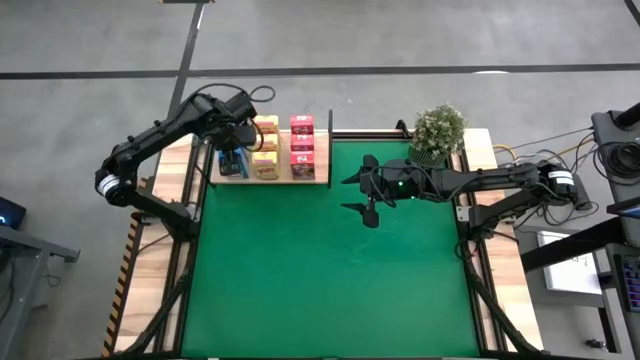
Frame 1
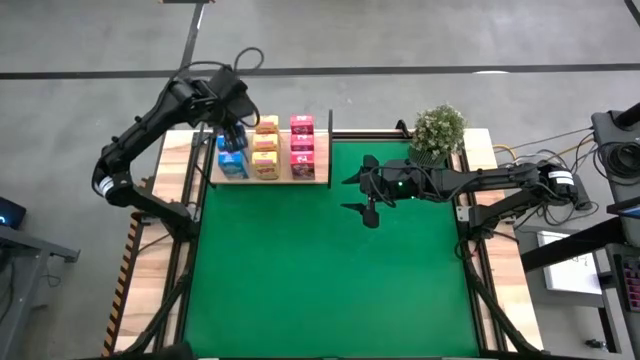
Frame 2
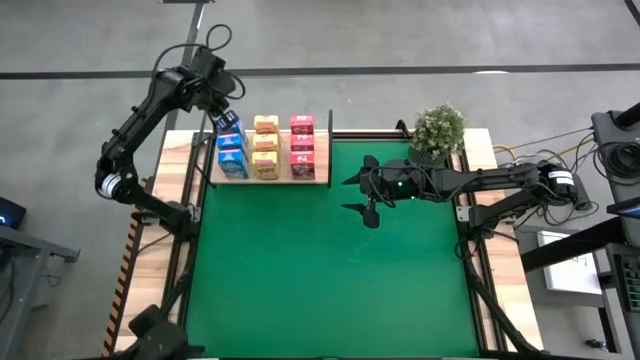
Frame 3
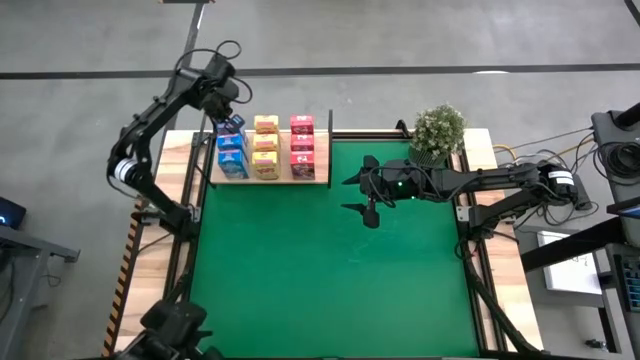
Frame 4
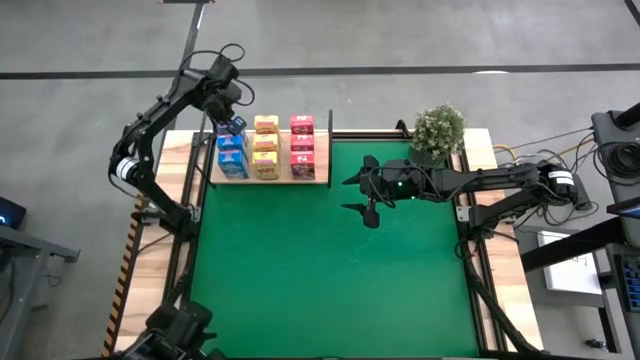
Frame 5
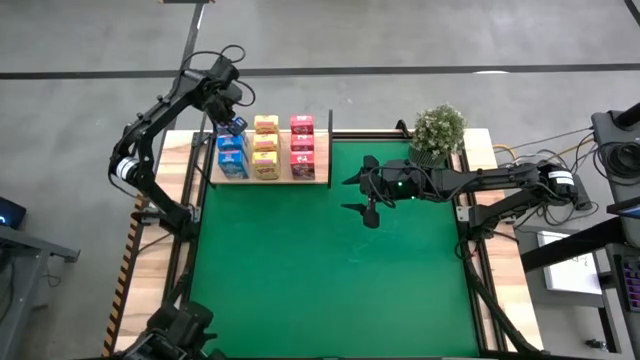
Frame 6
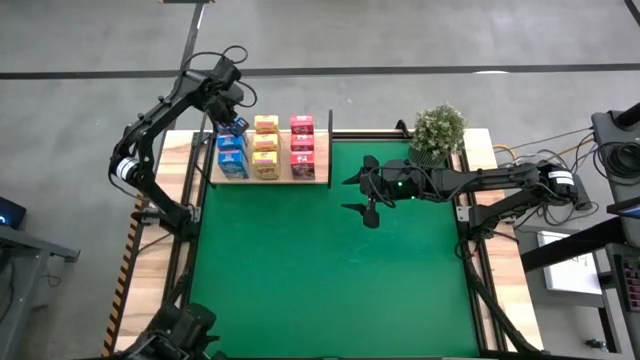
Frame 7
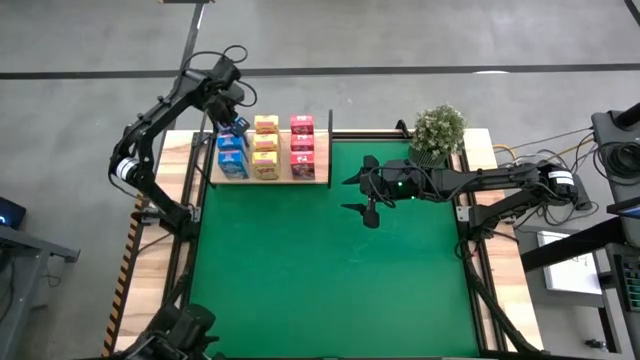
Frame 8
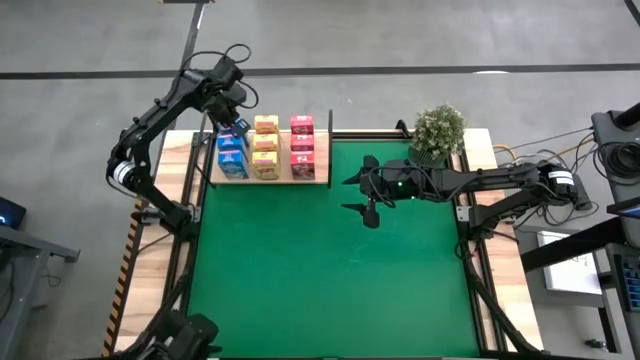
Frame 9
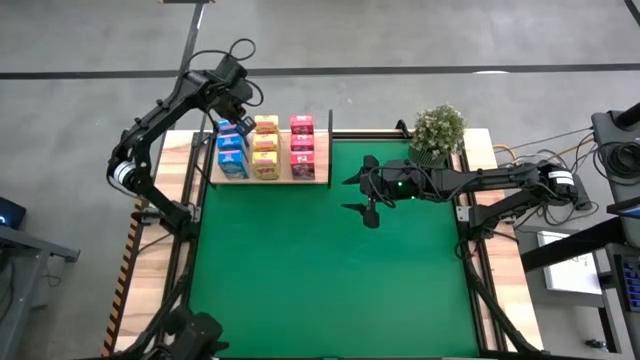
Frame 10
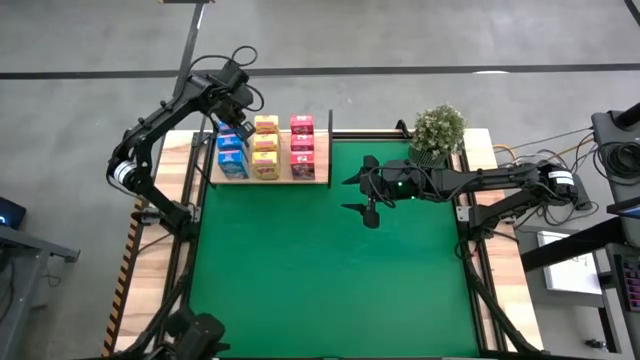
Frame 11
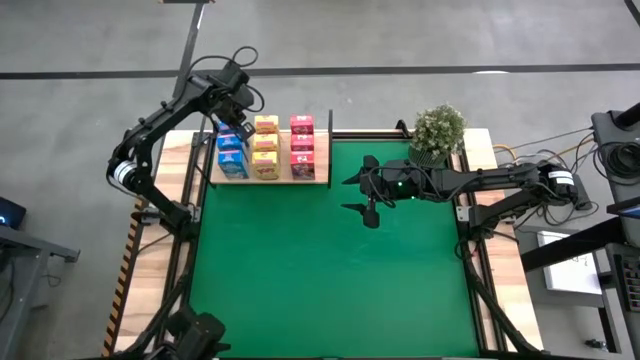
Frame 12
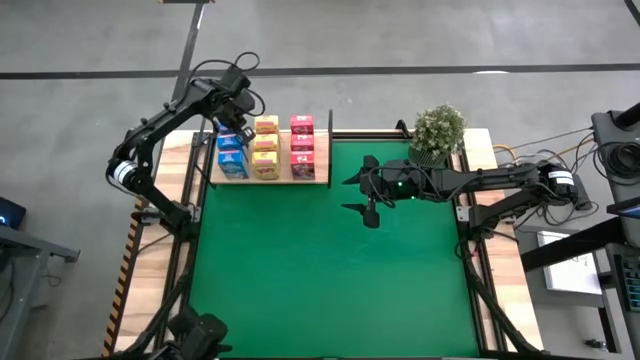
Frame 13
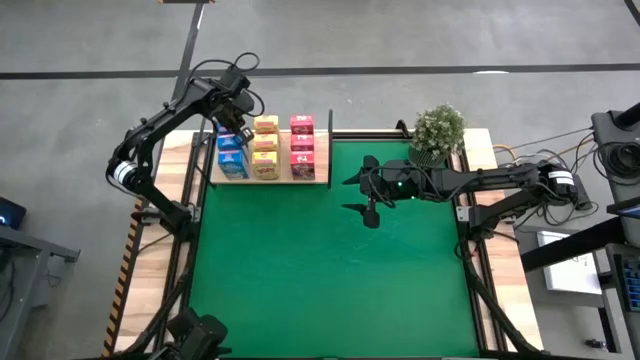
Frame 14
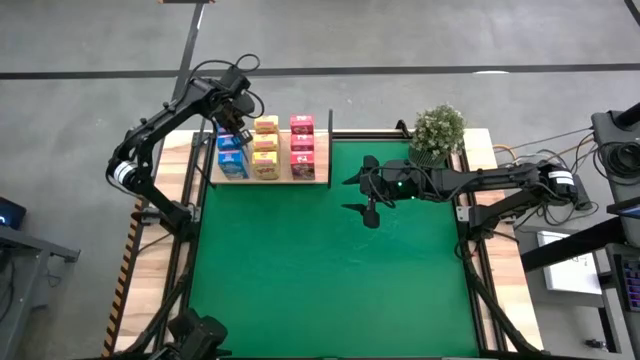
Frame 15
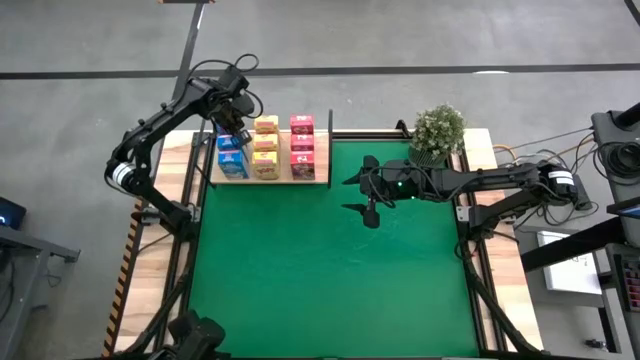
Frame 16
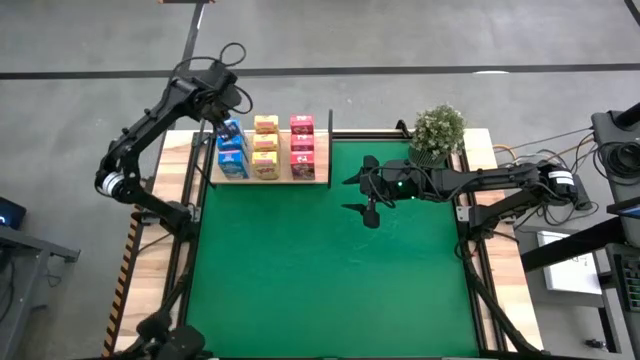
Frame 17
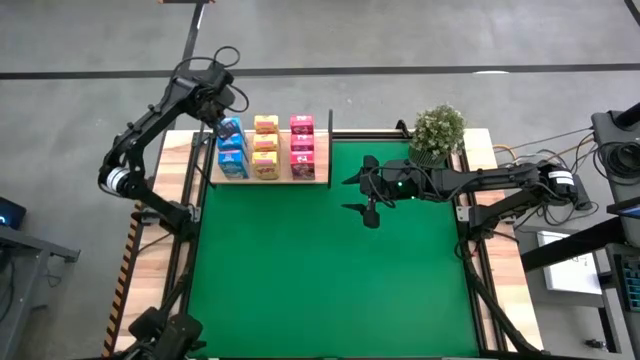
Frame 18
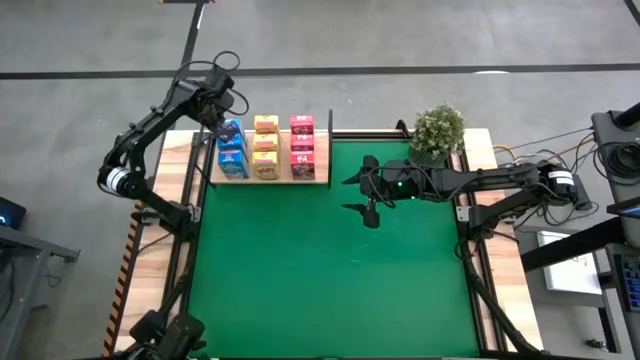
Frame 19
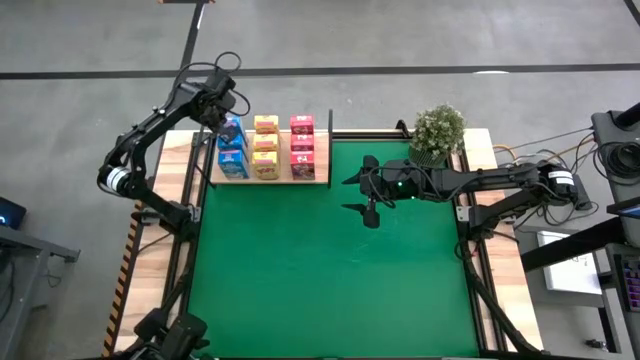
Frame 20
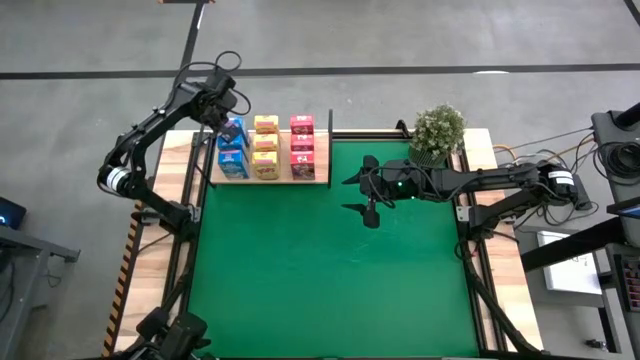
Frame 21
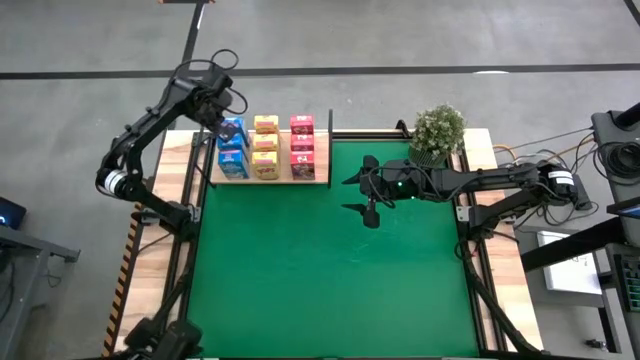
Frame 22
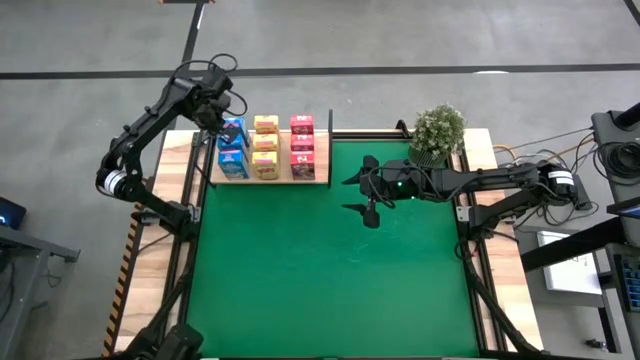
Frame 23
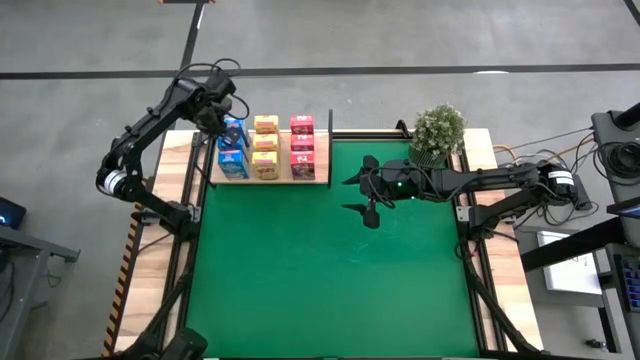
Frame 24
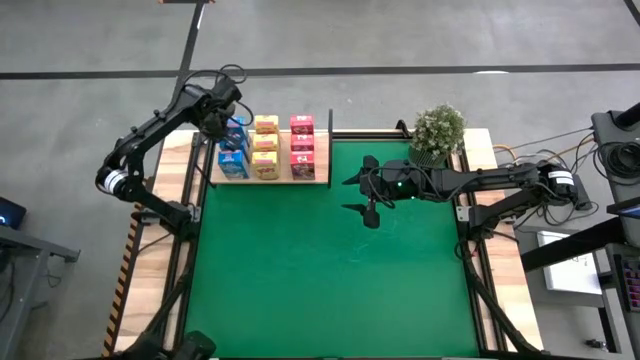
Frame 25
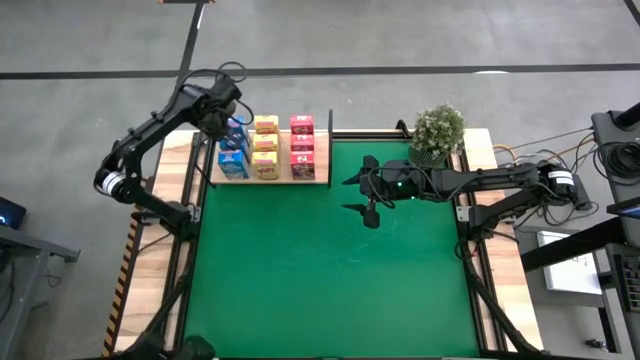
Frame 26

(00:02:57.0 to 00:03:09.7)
Task: Stack cereal on shelf
Adjust the top blue cereal box on the shelf

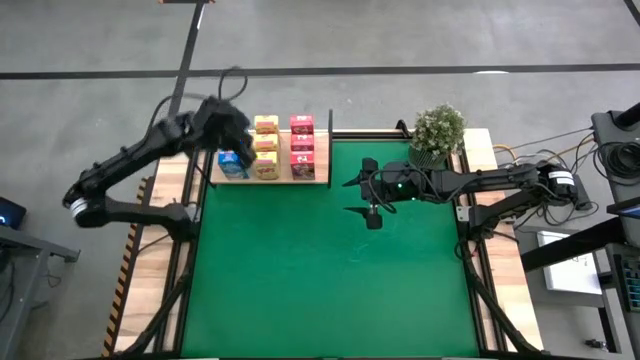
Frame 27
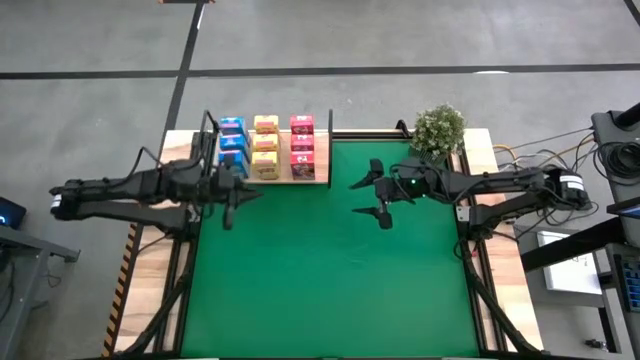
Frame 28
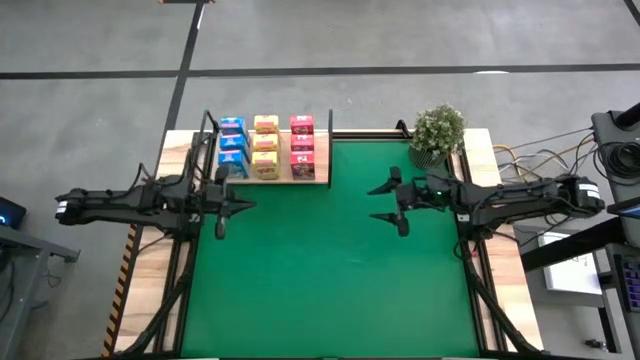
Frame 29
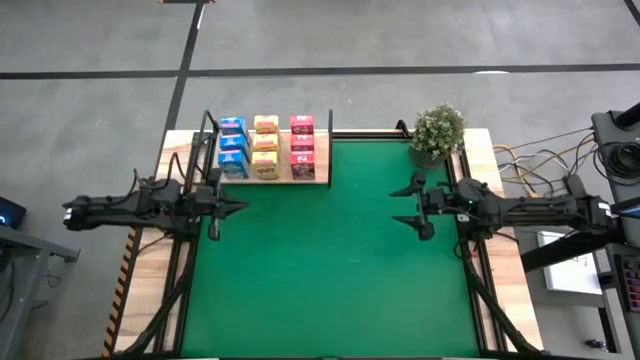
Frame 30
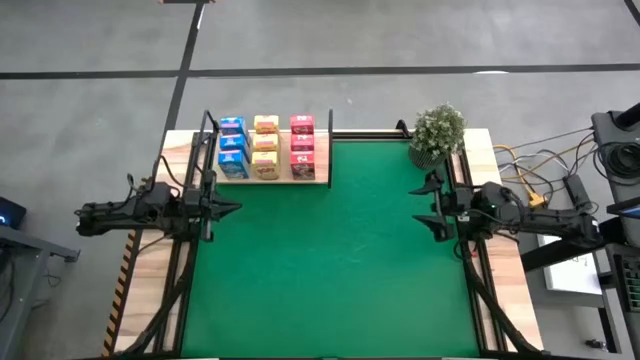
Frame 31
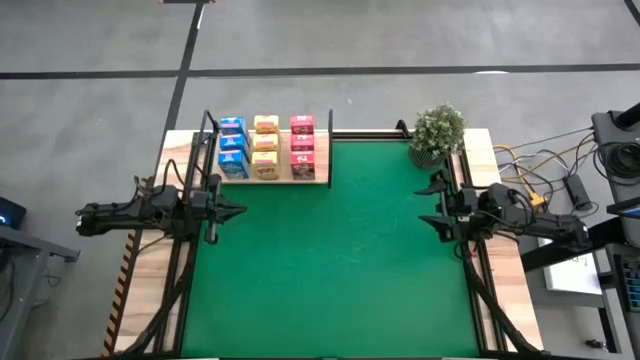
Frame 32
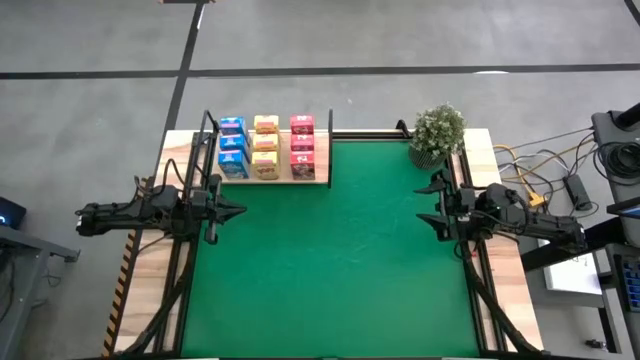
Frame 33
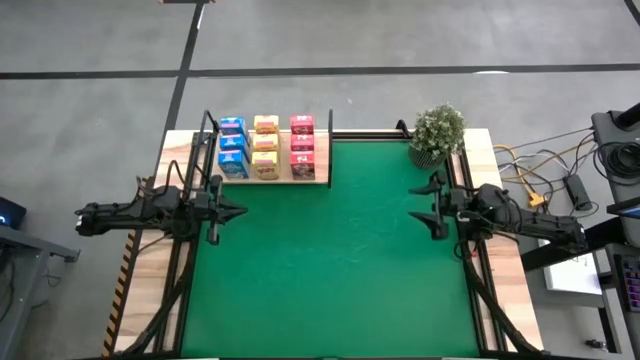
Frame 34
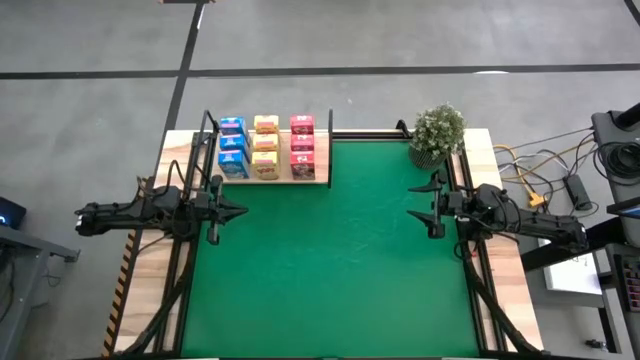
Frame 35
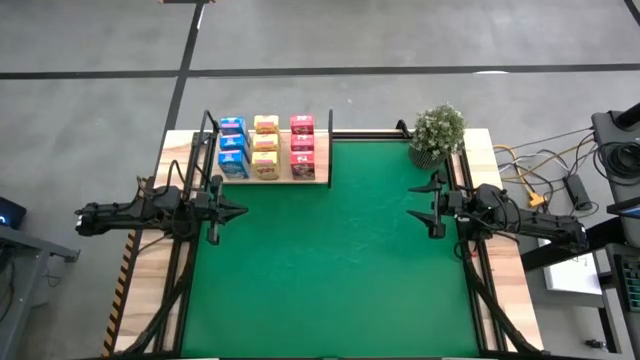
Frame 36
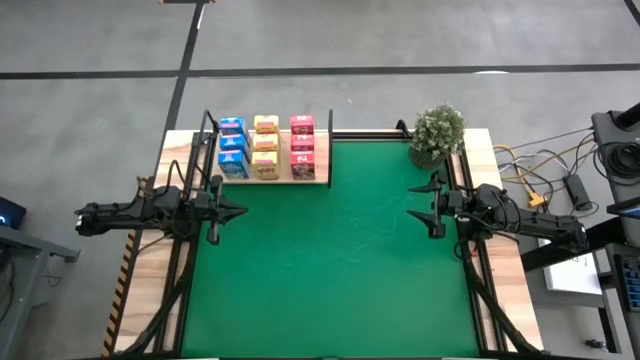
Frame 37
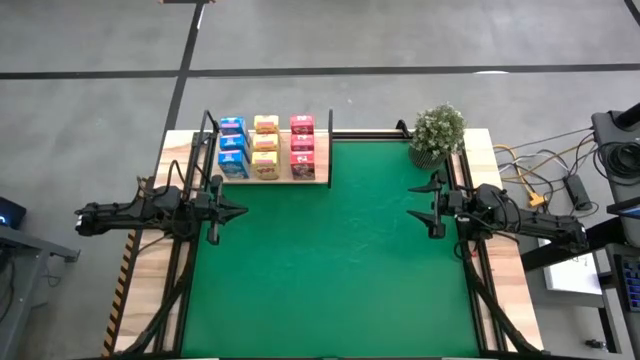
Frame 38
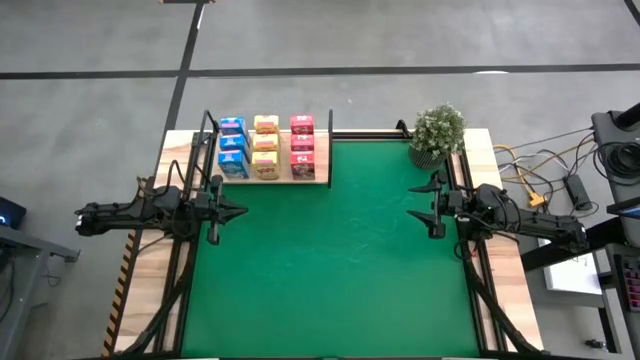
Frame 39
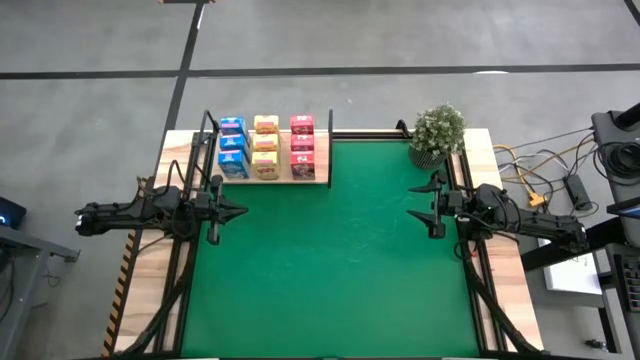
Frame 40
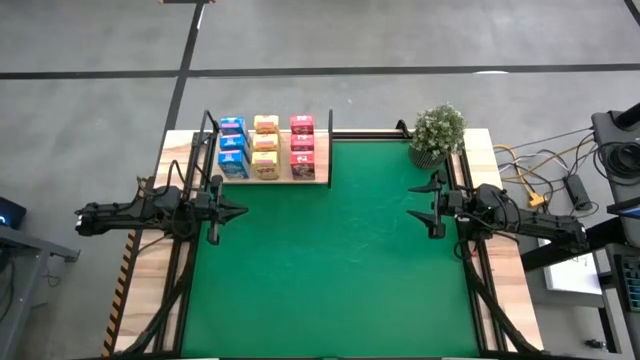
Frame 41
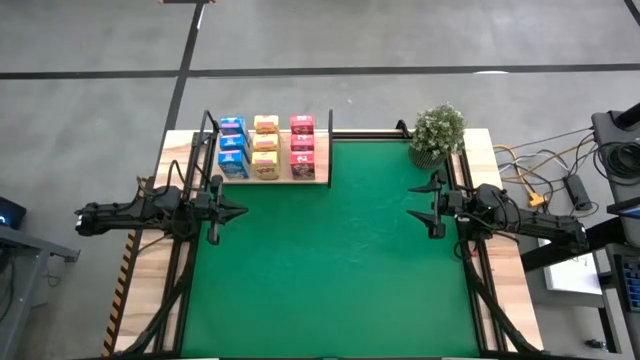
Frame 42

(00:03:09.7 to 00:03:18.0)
Return to Home Position

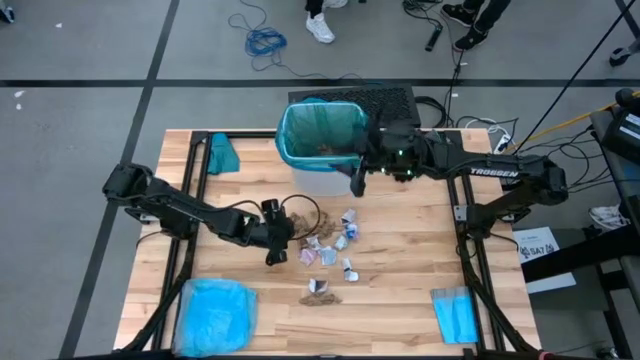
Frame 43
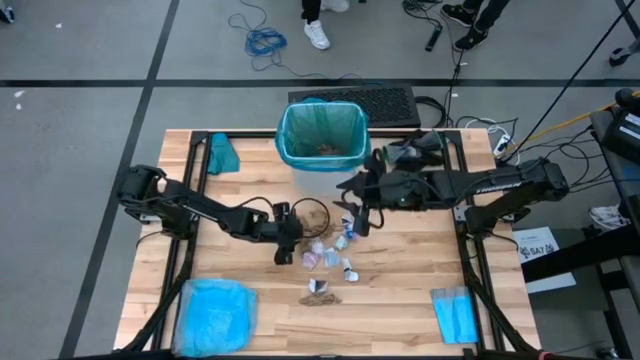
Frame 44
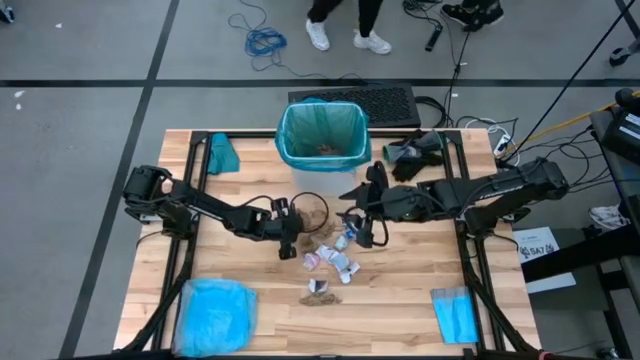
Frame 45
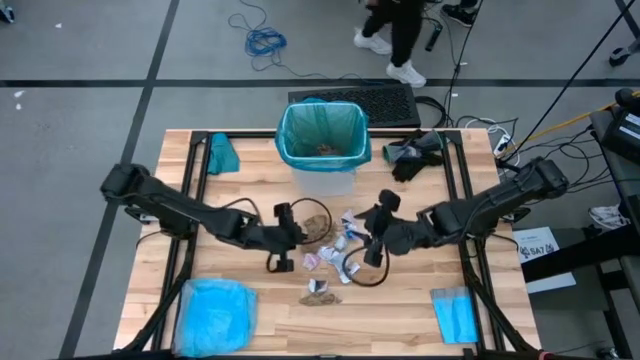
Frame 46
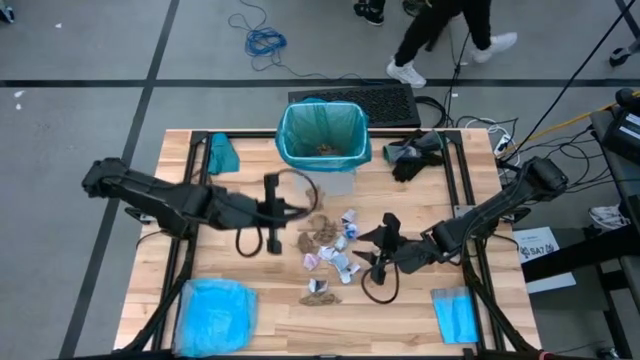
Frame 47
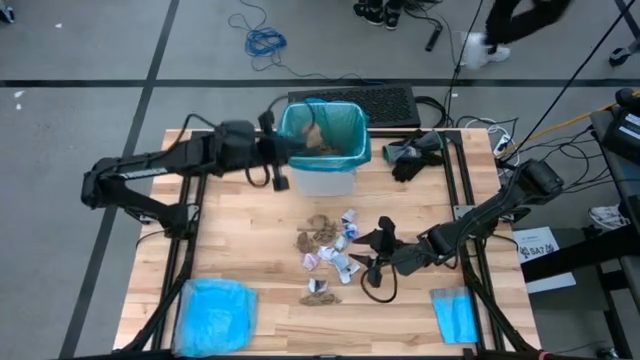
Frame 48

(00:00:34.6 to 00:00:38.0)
Task: place trash/remove bag and relplace
Put the brown napkin into the trash bin
